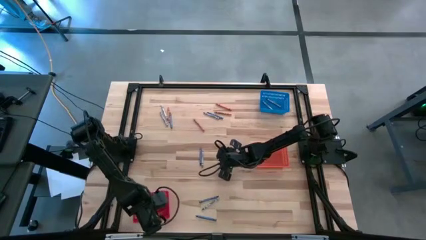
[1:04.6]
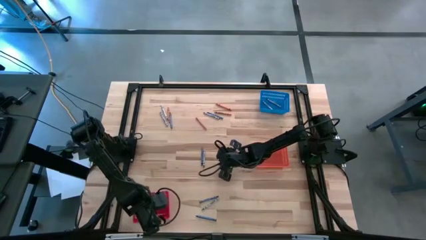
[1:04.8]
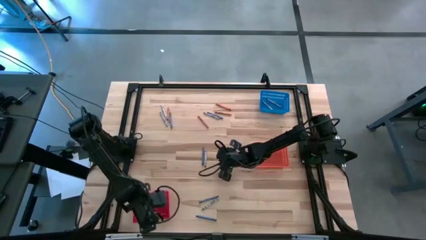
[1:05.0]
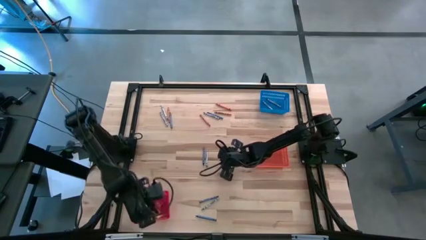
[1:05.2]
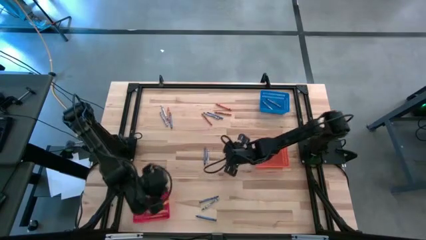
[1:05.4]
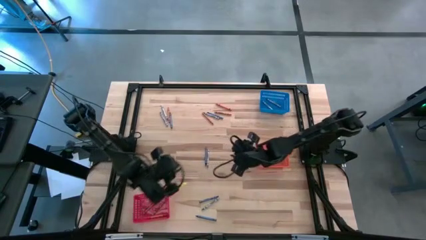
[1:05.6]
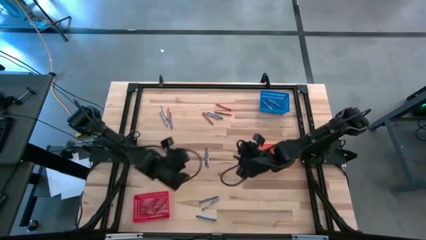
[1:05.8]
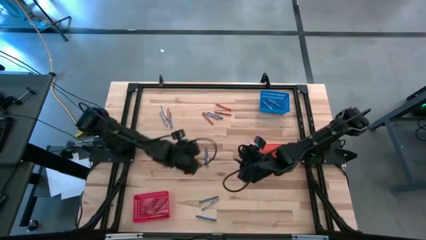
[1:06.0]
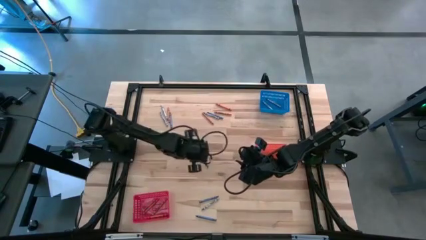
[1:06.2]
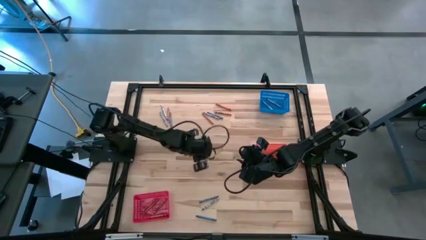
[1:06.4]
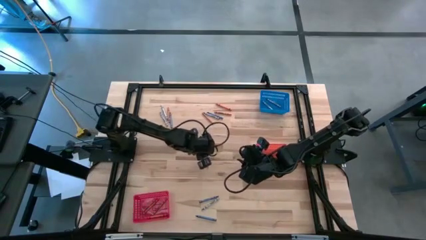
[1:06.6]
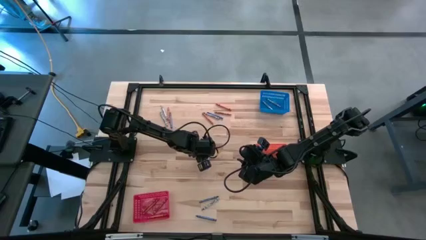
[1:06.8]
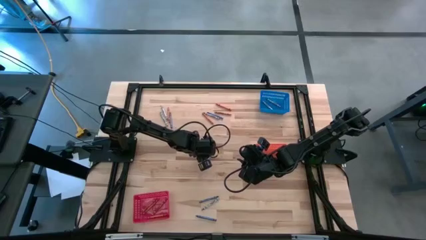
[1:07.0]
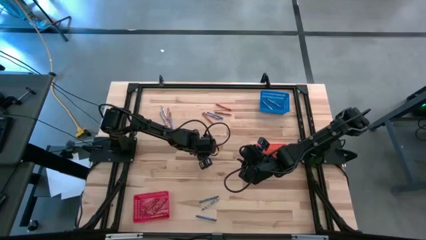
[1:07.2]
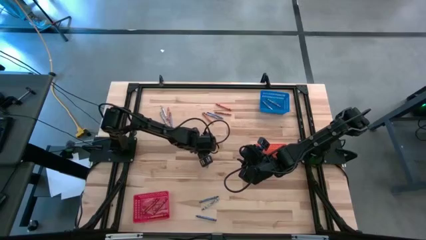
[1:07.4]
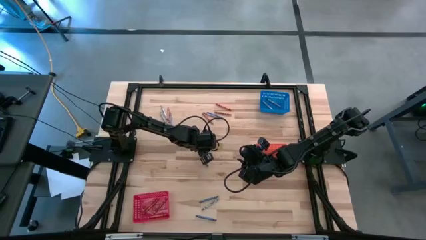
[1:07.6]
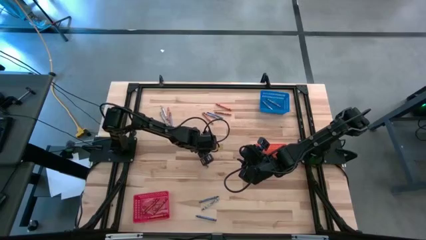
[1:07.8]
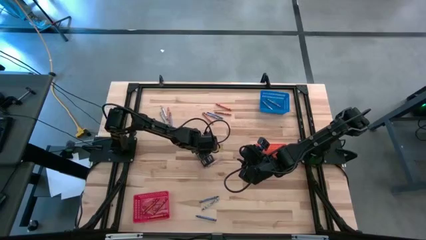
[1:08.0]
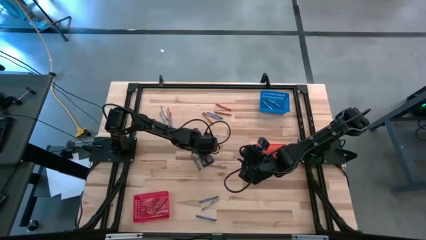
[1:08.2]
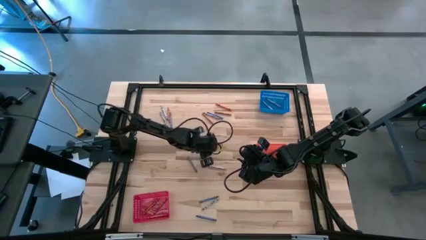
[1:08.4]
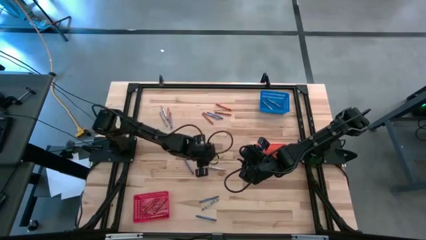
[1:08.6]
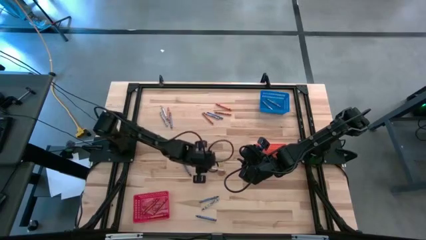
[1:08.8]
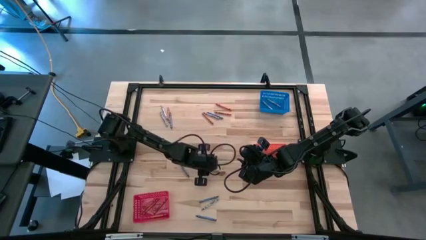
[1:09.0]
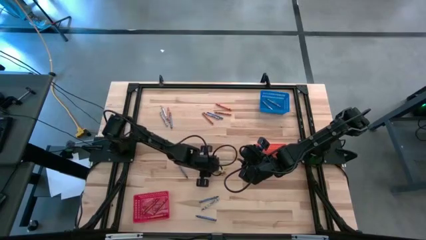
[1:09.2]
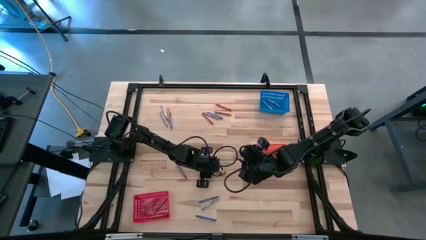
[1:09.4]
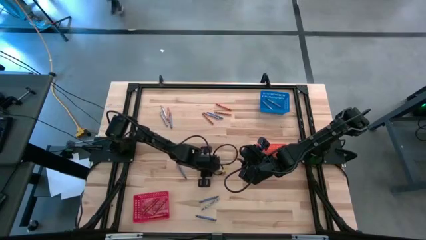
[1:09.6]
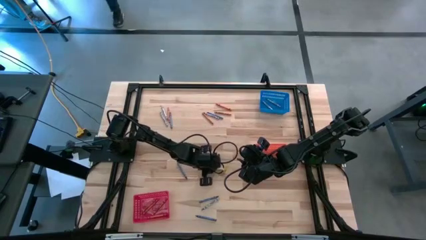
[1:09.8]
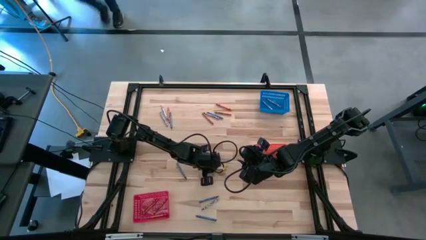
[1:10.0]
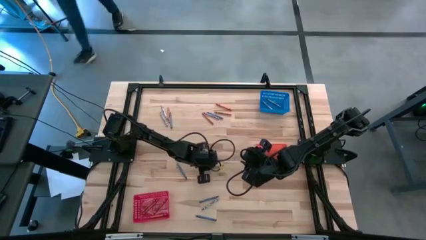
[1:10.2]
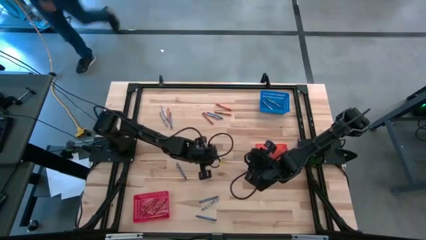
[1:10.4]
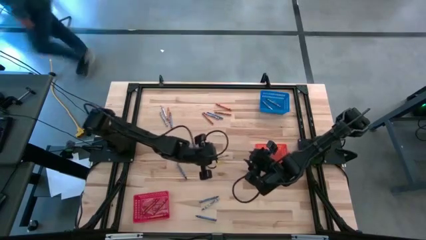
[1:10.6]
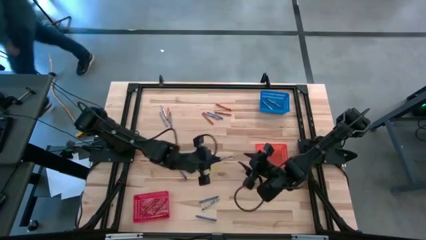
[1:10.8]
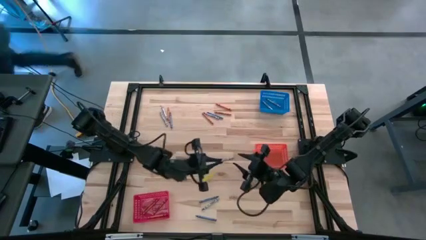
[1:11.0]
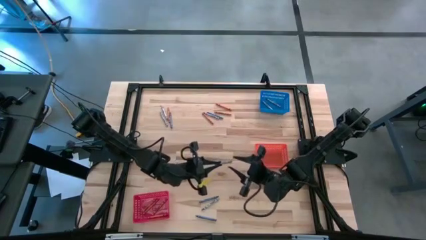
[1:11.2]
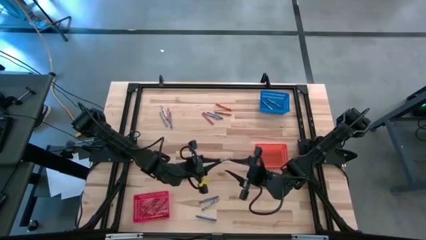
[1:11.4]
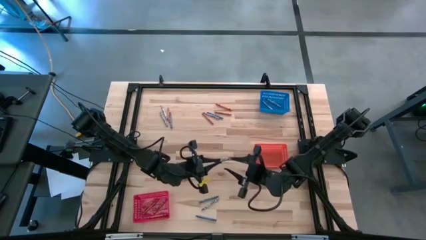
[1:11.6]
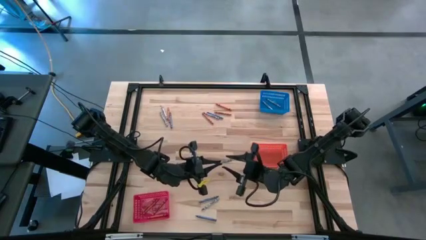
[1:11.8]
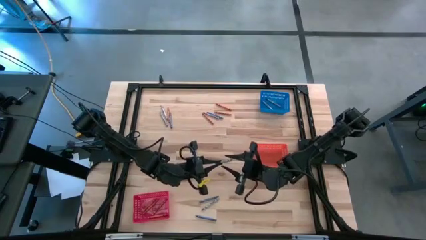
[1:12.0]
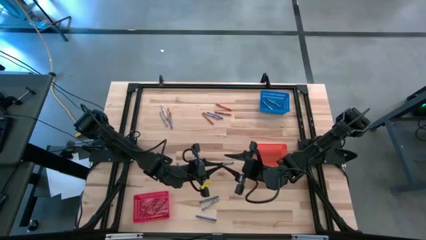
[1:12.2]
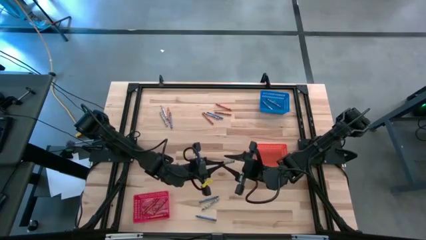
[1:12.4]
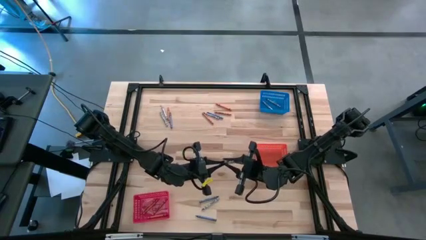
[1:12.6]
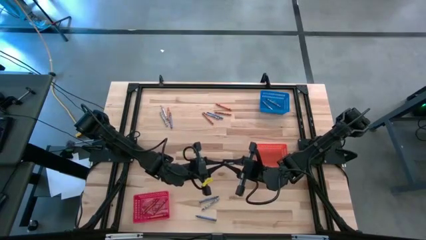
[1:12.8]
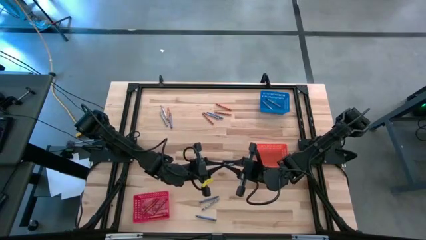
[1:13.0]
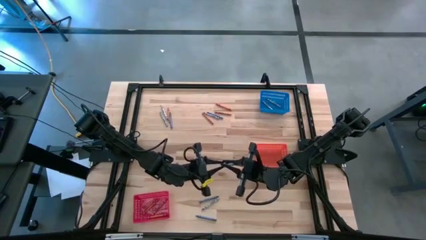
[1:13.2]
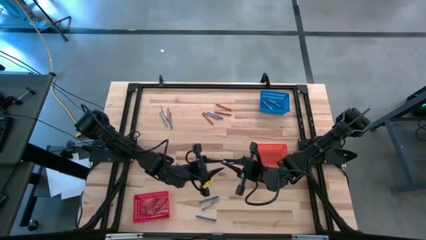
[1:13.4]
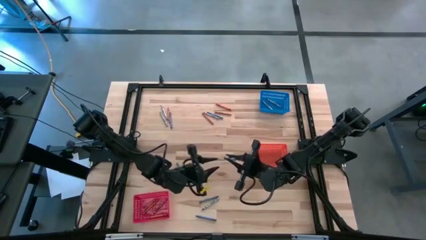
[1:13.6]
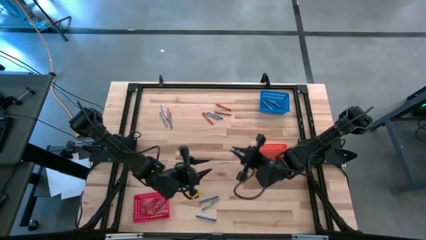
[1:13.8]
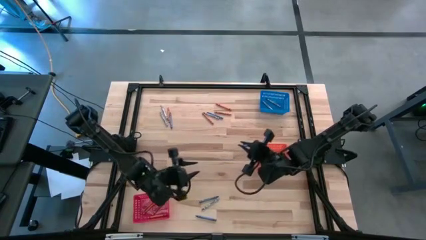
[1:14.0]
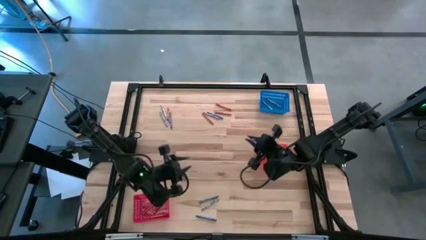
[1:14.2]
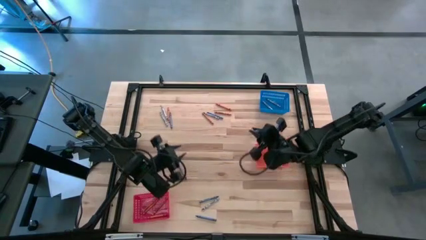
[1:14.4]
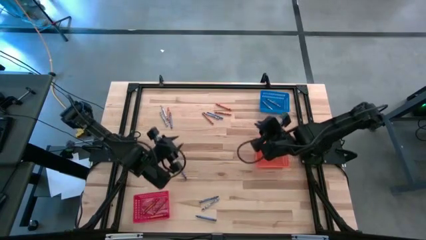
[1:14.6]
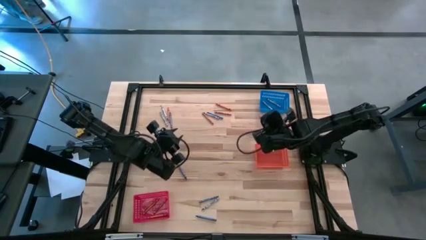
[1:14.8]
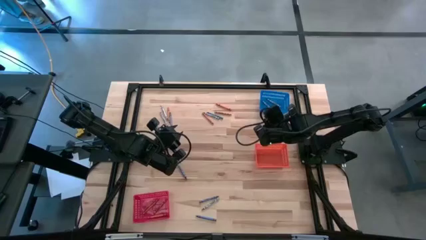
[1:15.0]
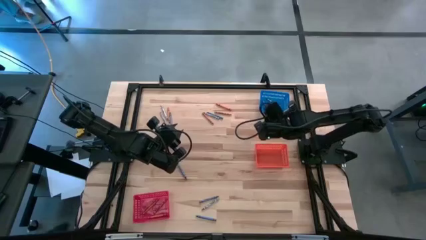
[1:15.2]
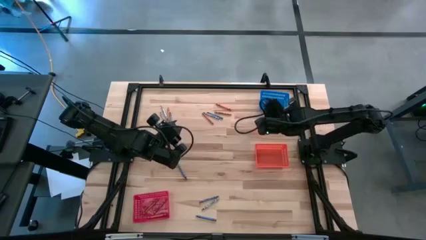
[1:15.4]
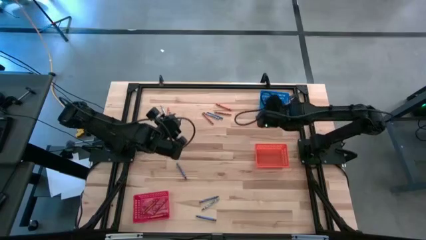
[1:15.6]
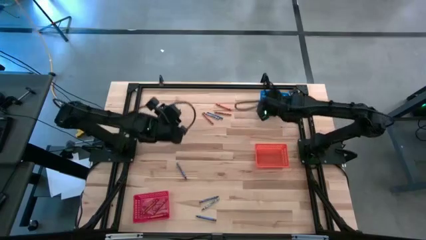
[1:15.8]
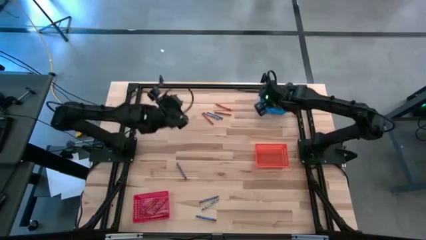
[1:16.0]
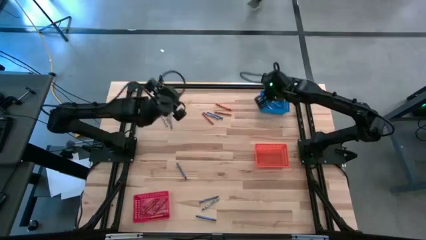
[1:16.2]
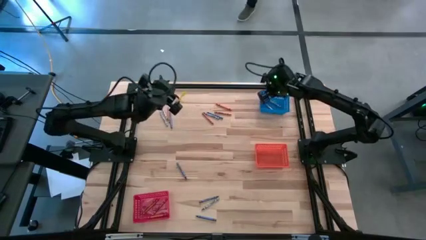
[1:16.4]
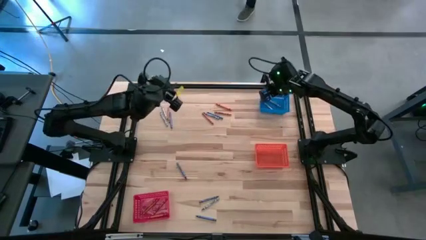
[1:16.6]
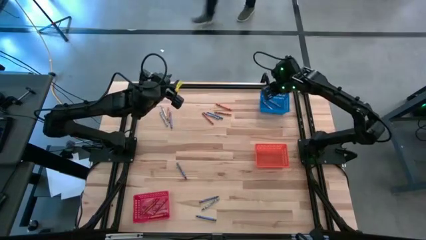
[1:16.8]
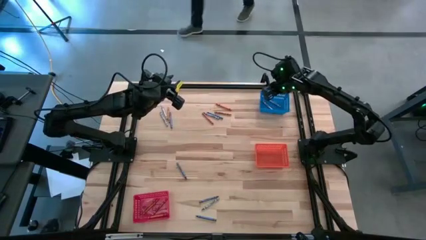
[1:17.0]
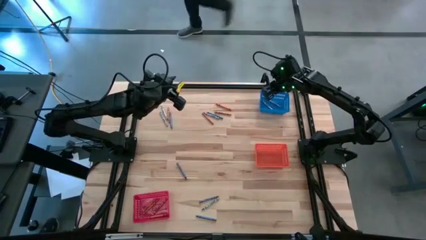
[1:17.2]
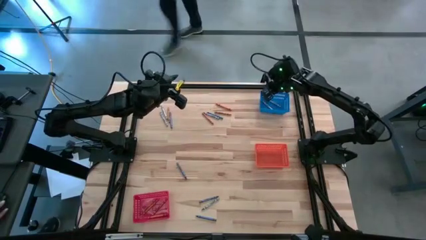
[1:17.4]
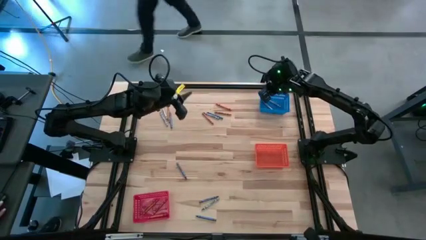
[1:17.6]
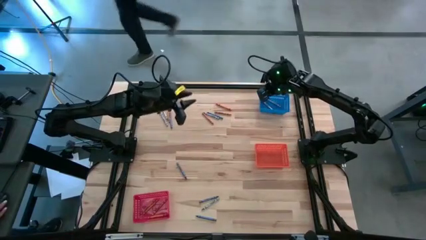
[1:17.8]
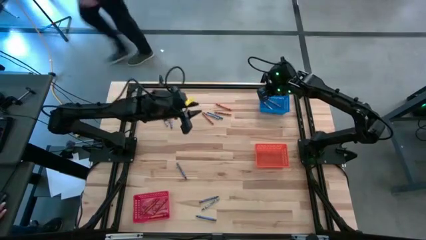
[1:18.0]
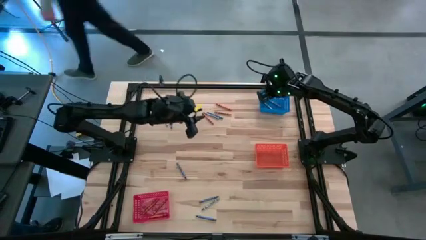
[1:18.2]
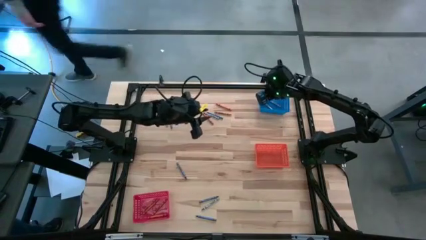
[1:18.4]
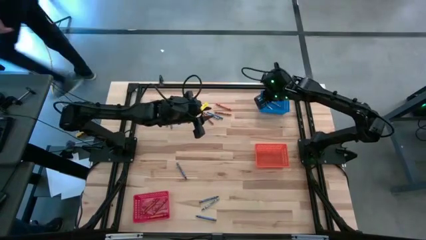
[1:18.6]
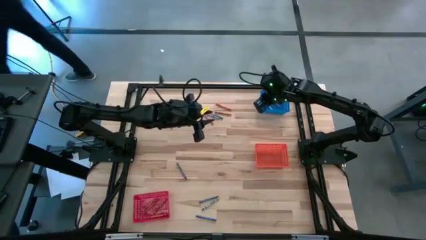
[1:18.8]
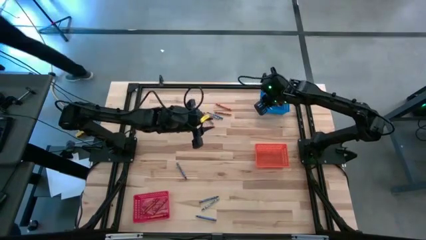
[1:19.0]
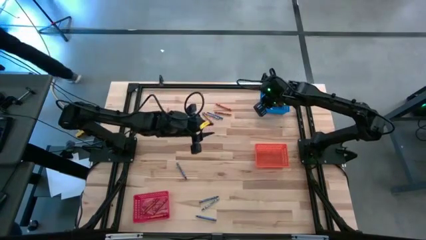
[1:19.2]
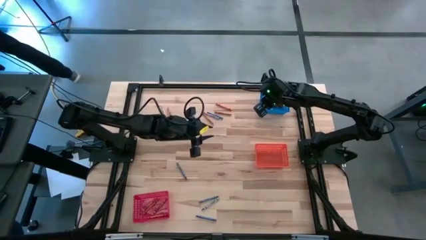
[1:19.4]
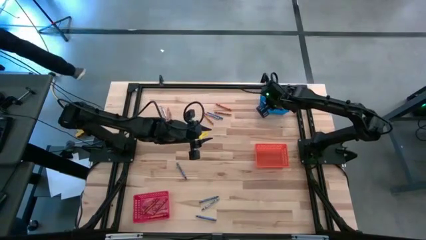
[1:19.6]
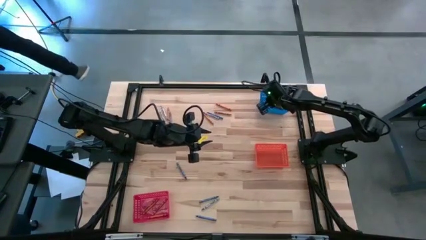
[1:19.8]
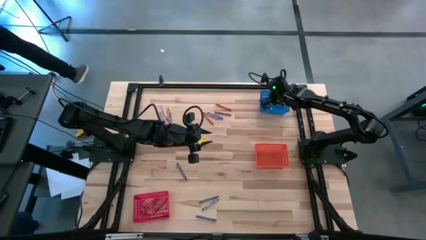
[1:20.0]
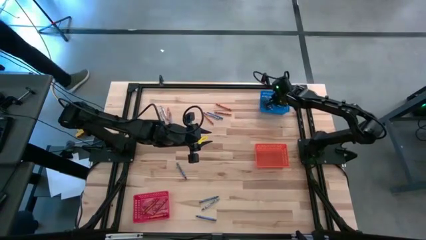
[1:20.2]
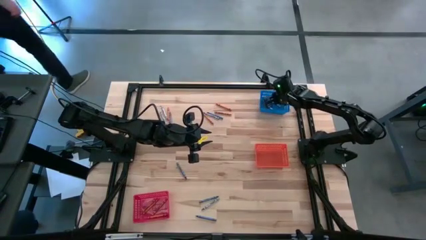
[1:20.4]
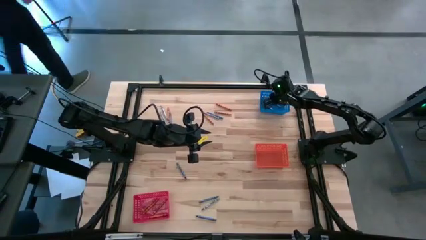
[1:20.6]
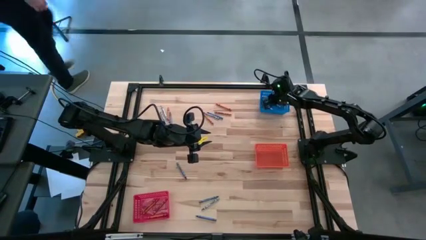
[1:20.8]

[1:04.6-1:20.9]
Task: Sort crayons
Put the gray crayon into the blue bin
